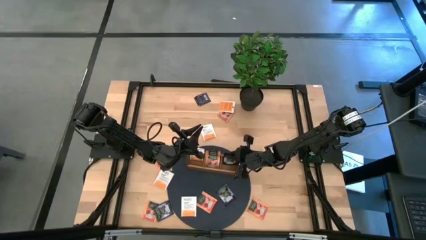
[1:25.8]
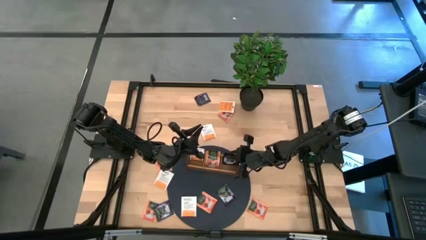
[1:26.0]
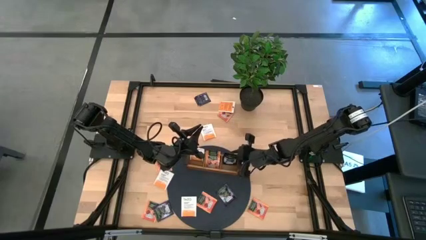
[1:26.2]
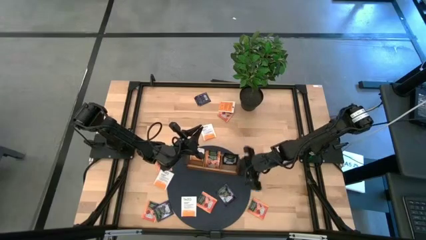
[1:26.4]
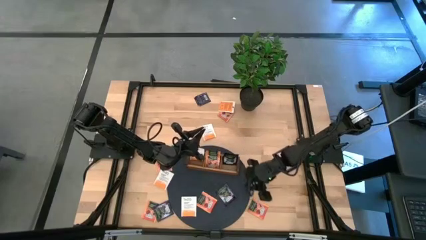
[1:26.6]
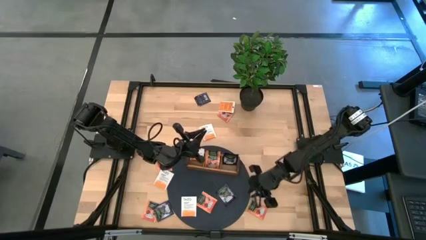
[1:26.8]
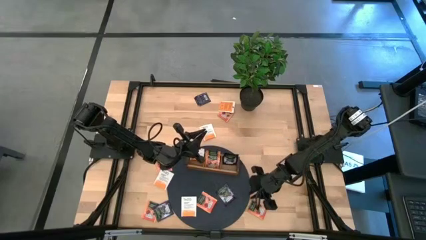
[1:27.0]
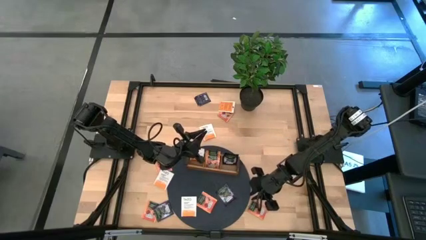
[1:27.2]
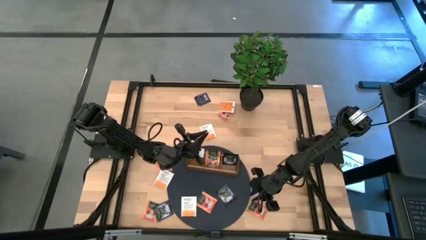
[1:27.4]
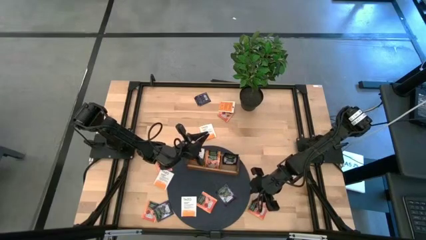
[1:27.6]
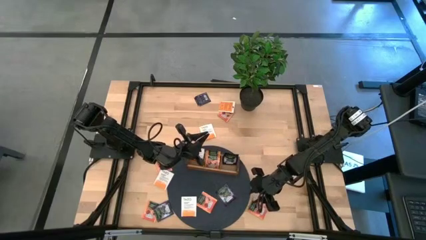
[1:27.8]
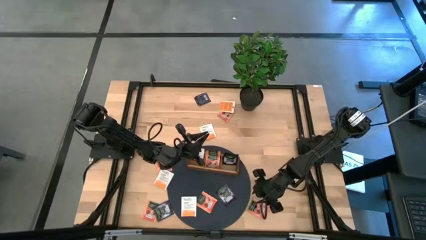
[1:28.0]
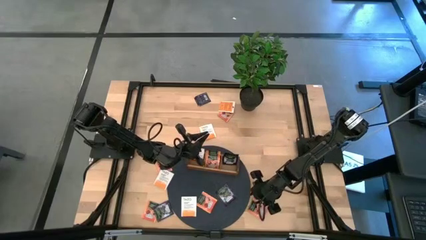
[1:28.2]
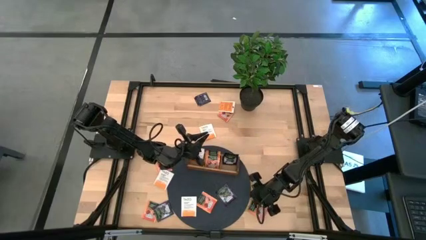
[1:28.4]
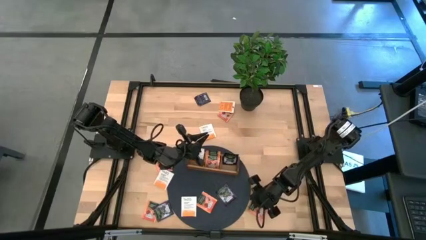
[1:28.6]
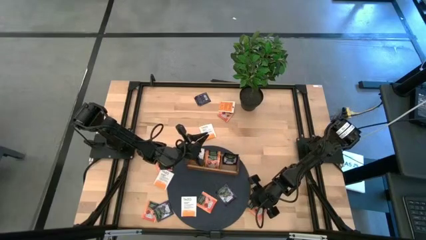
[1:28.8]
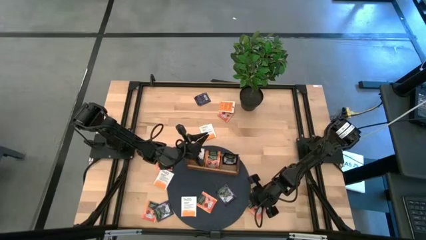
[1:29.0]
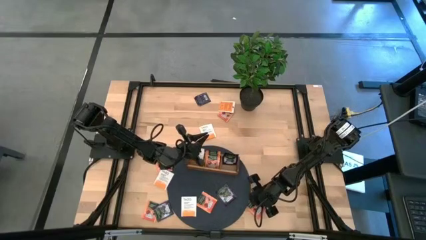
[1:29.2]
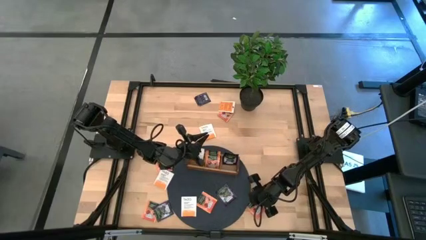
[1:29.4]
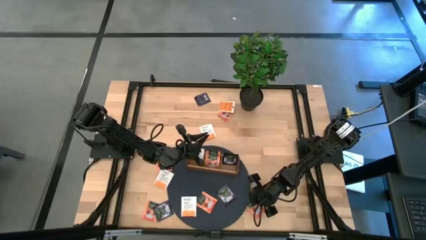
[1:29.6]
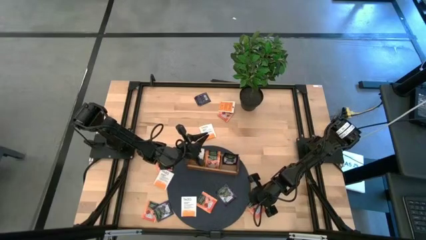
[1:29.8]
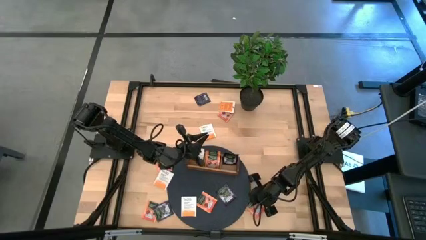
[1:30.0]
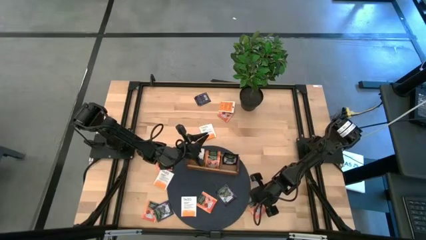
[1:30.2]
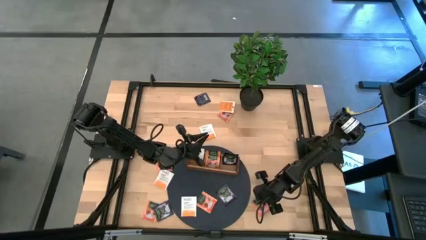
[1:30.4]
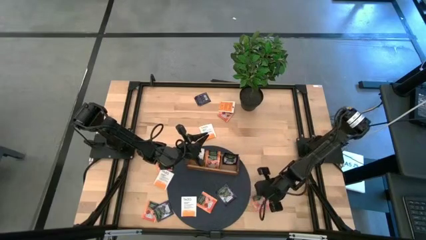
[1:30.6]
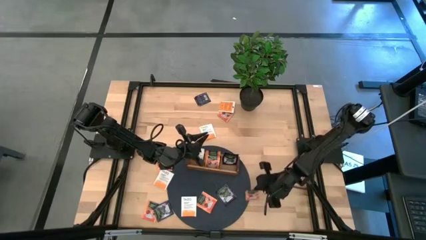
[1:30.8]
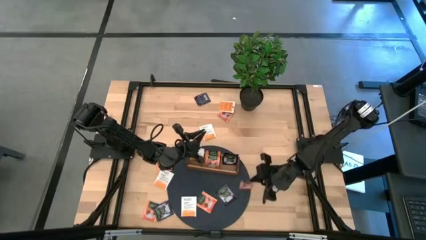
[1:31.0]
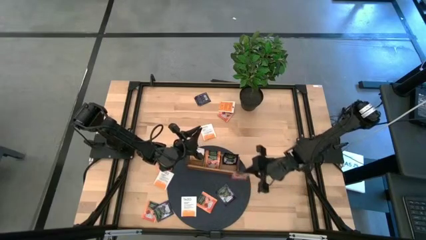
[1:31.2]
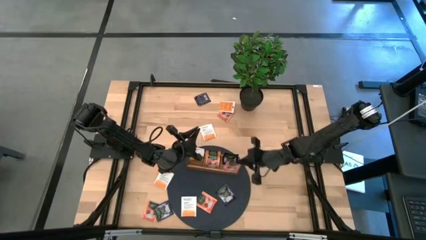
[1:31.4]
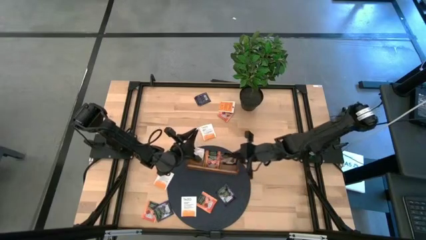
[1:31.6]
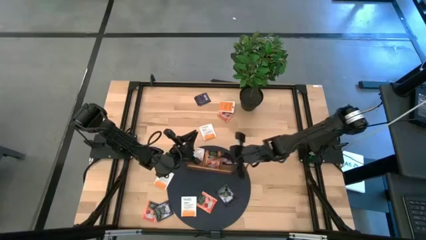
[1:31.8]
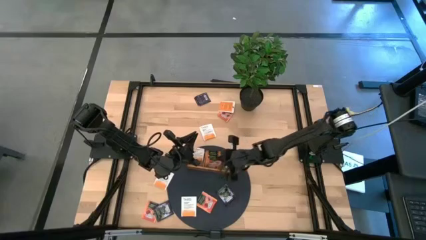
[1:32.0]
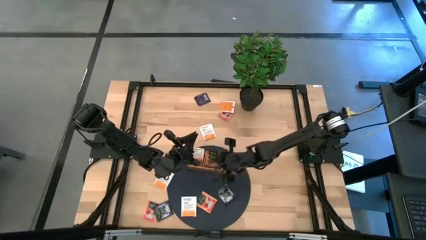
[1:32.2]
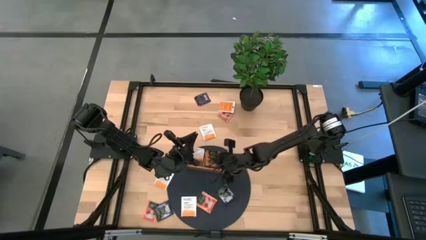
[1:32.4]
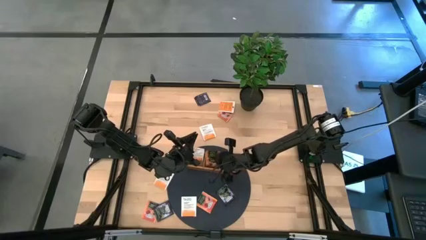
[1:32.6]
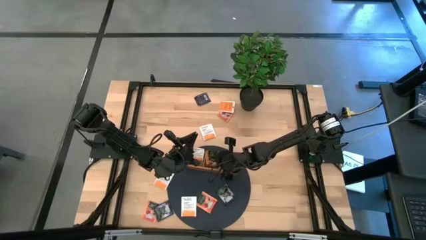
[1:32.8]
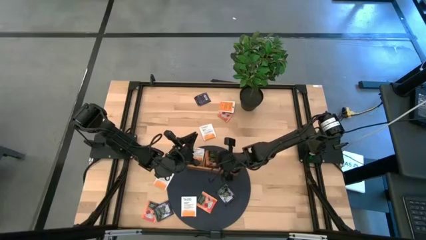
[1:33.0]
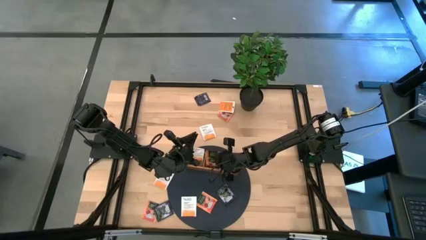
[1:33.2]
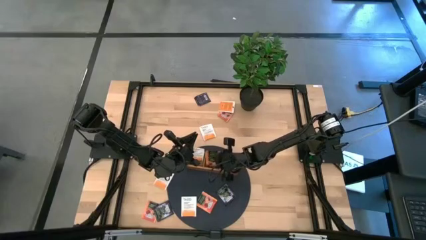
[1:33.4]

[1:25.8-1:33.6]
Task: Pick & Place Tea
Put the orange black tea bag into the middle section of the wooden organizer

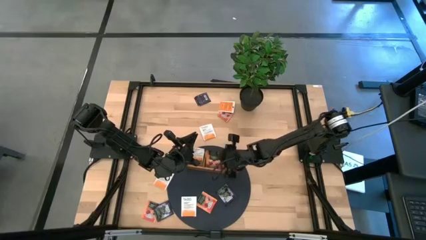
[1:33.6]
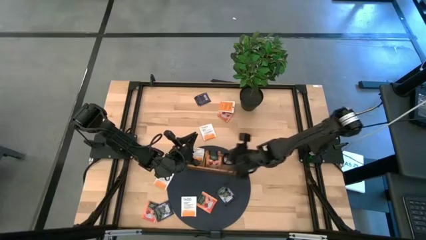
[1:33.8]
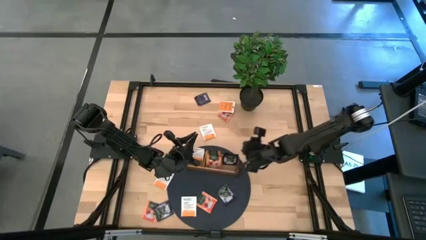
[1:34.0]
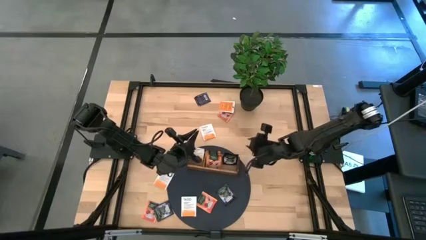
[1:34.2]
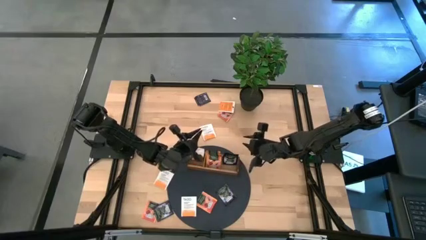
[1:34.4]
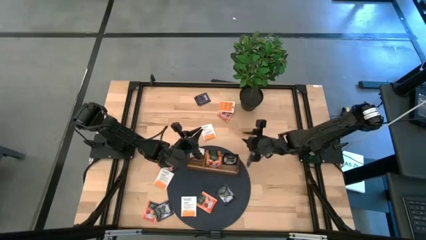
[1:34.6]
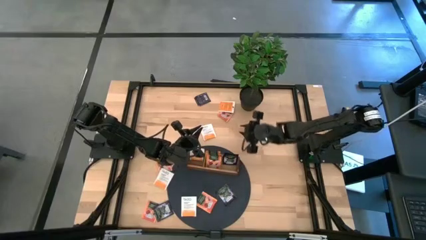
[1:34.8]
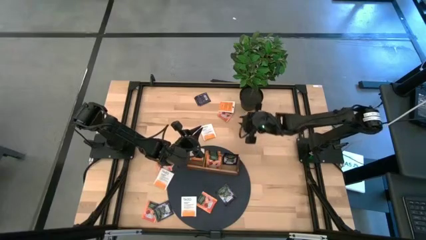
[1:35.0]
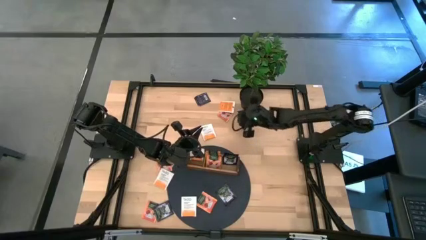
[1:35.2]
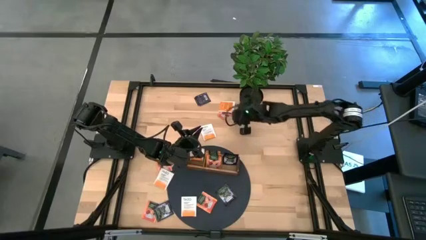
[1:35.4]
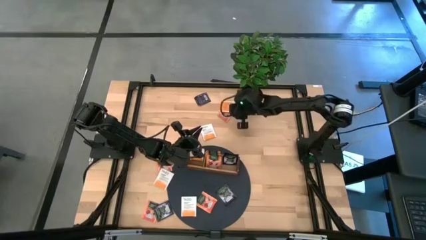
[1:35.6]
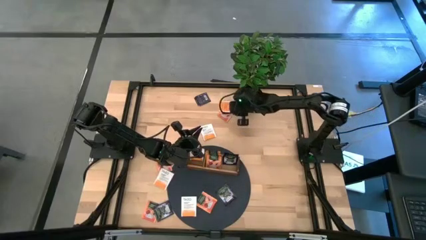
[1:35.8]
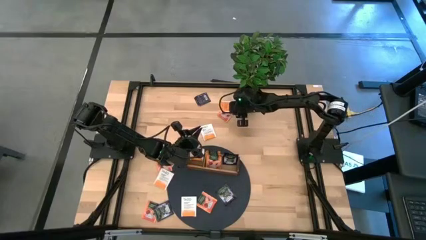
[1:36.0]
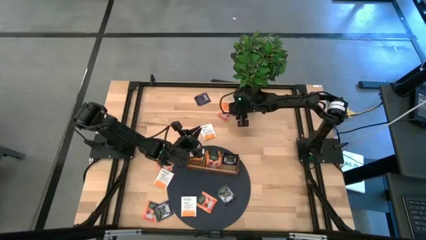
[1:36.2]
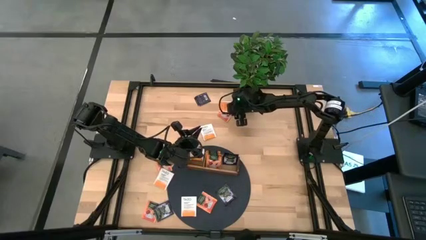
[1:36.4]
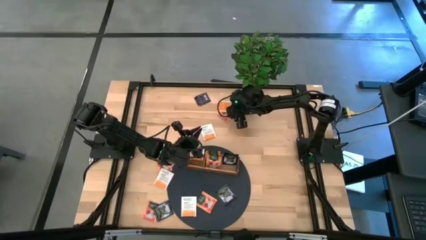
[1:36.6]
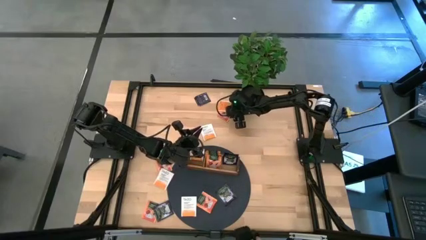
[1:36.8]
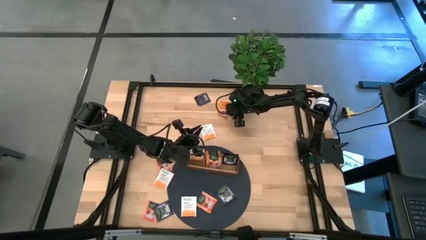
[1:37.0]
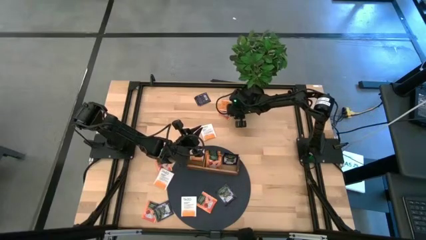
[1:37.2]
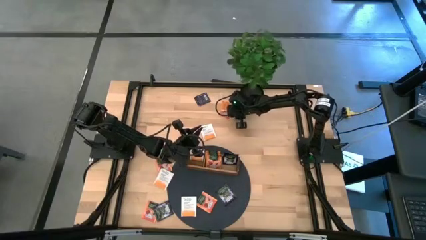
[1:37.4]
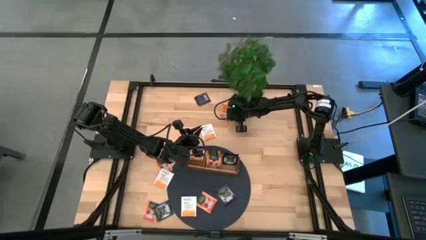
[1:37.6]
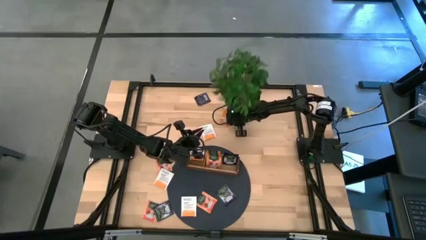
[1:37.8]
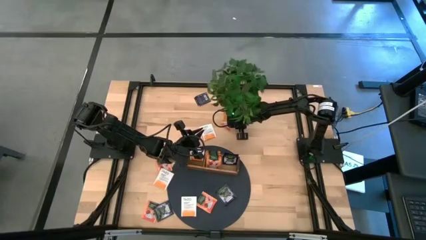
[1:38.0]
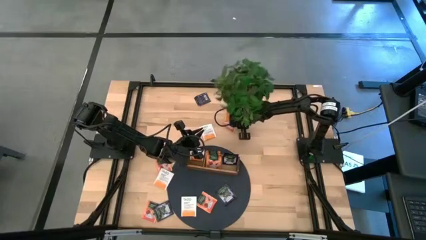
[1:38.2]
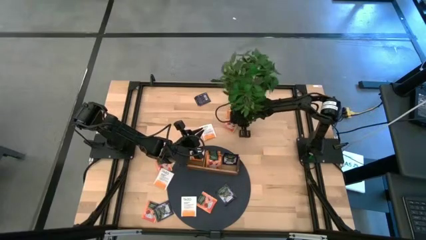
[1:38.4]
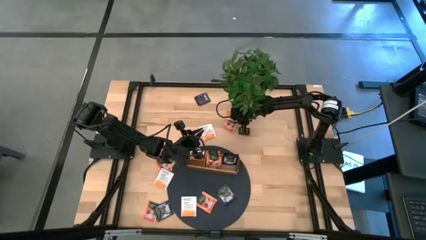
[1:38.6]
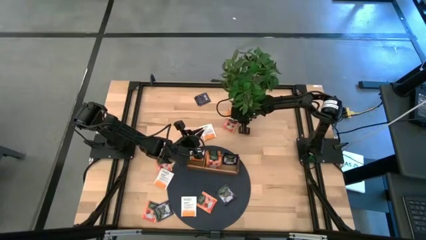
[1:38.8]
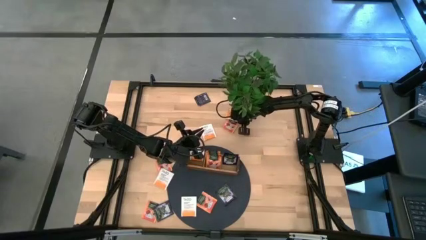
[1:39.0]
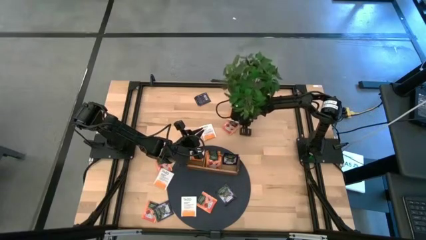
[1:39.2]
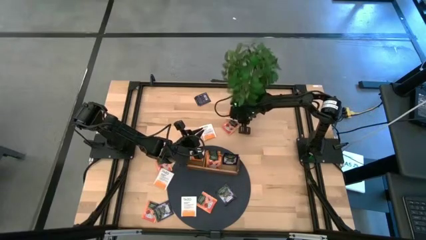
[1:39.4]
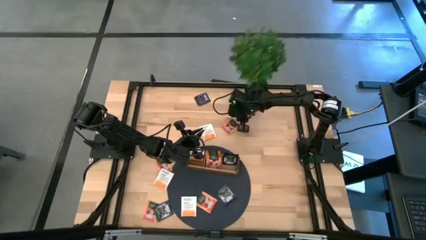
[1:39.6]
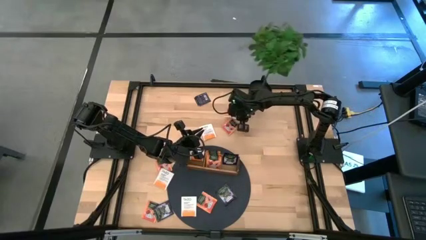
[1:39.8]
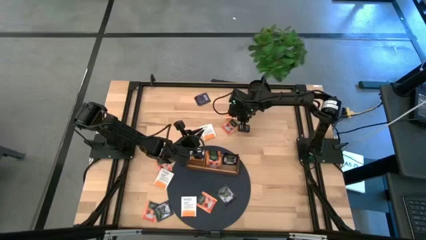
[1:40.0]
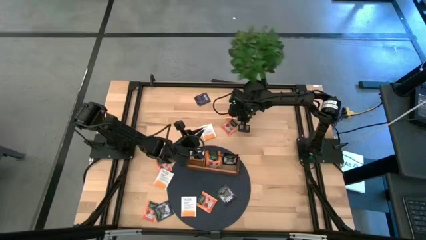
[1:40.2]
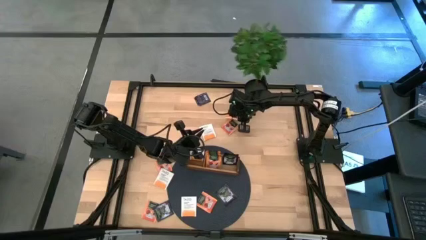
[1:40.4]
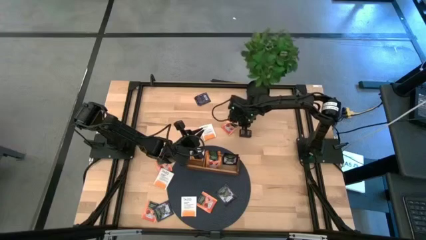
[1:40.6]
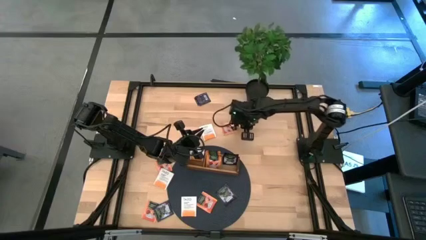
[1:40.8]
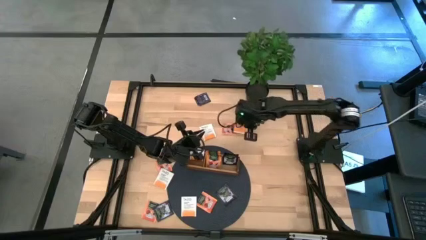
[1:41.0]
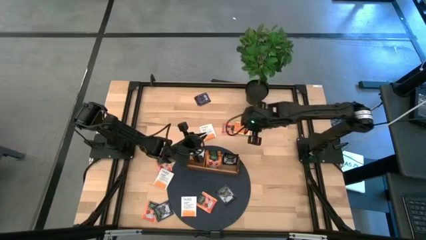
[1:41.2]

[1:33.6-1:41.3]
Put the white orange tea bag into the left section of the wooden organizer

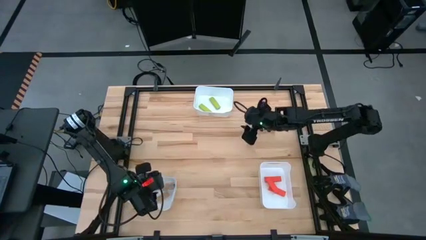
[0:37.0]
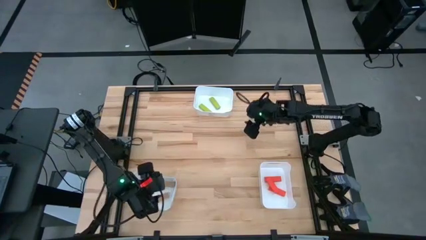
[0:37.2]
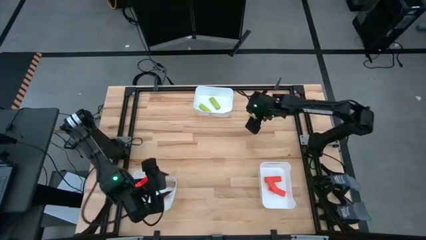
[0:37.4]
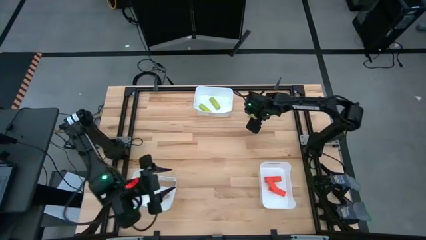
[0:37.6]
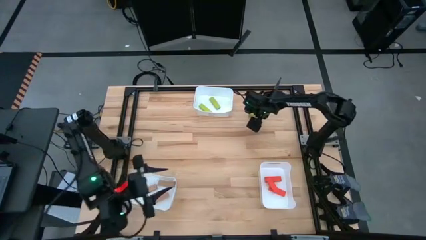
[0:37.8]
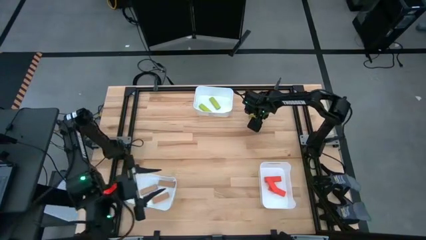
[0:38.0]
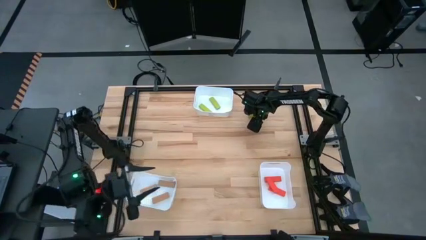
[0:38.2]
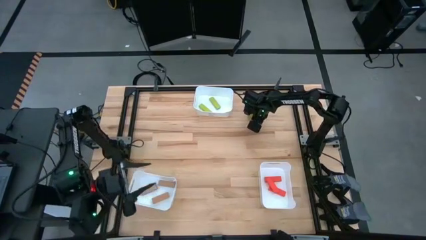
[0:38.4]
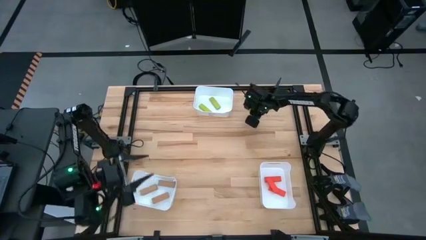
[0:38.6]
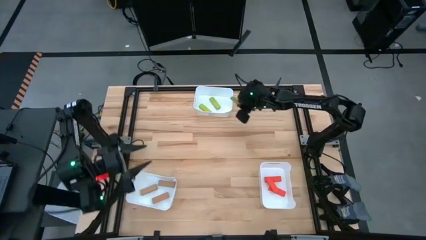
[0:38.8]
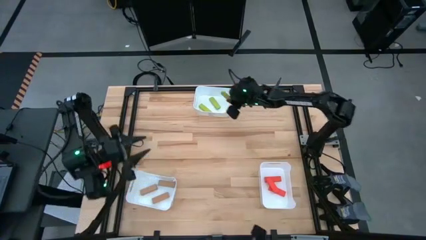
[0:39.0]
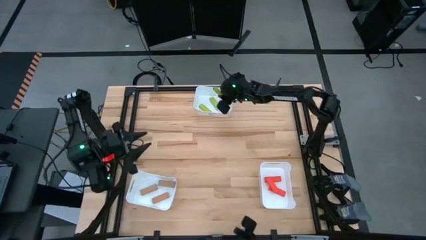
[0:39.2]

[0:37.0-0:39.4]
Task: Sort blocks
Put the green block into the top center white bin
